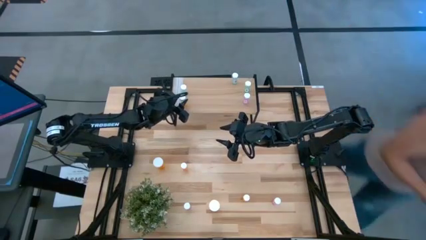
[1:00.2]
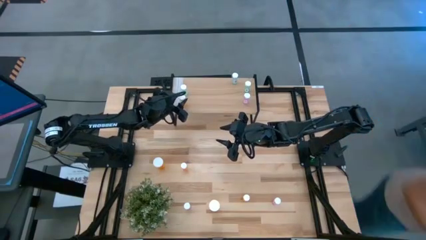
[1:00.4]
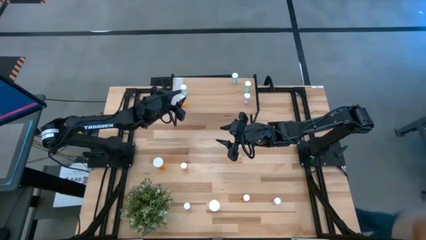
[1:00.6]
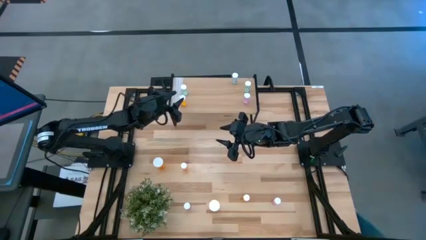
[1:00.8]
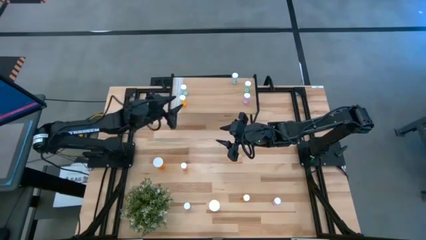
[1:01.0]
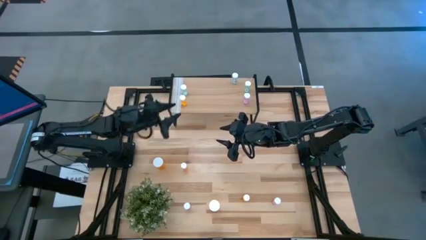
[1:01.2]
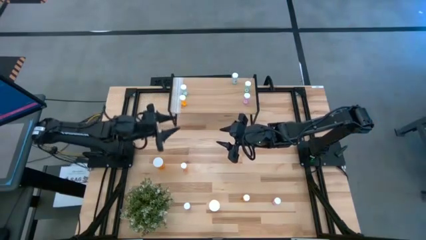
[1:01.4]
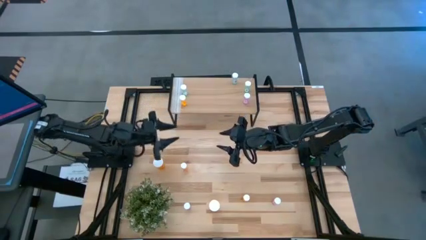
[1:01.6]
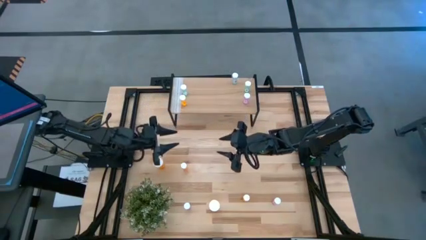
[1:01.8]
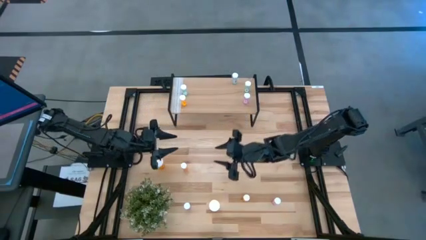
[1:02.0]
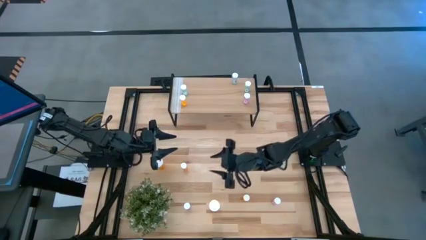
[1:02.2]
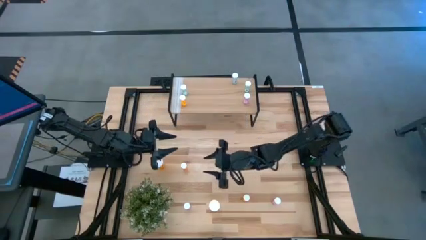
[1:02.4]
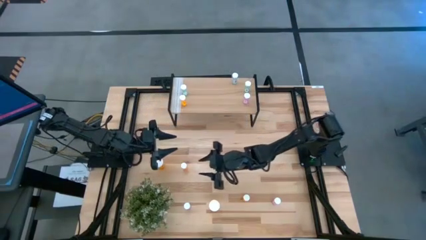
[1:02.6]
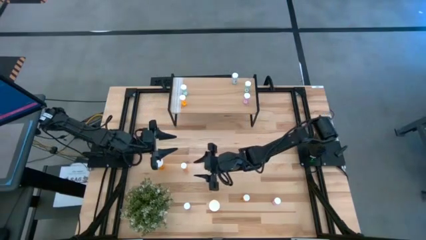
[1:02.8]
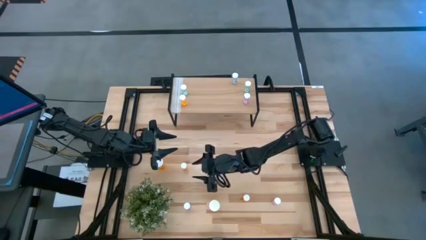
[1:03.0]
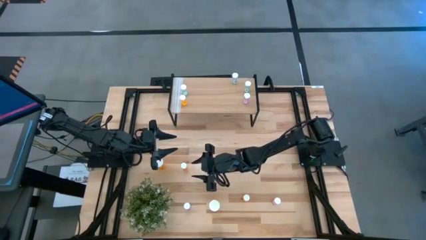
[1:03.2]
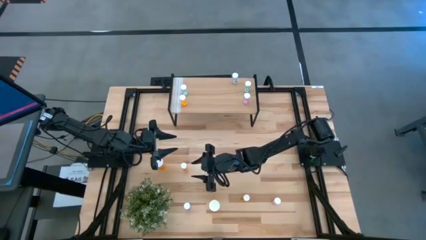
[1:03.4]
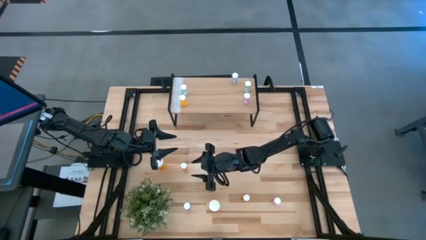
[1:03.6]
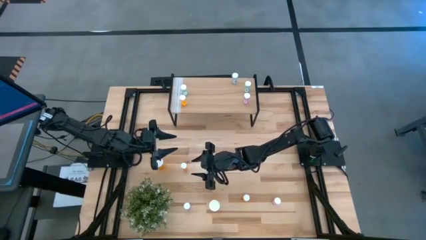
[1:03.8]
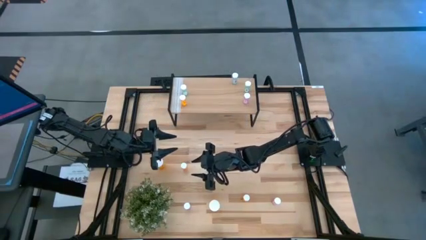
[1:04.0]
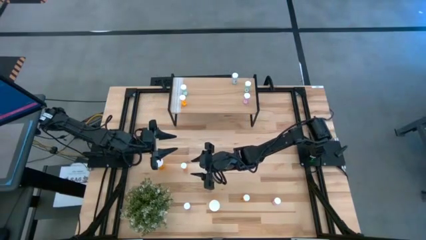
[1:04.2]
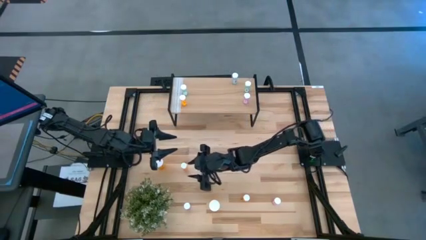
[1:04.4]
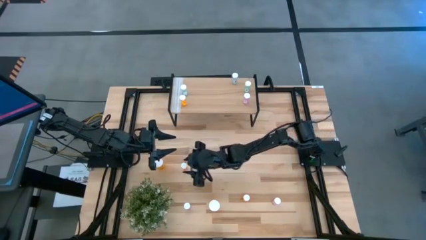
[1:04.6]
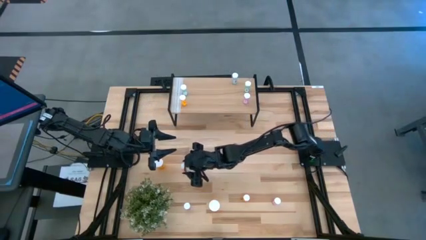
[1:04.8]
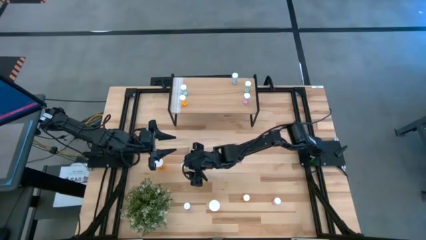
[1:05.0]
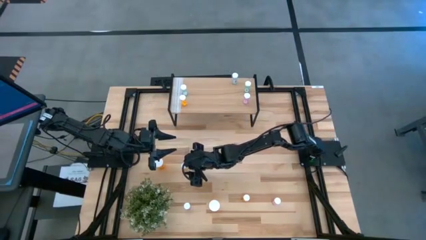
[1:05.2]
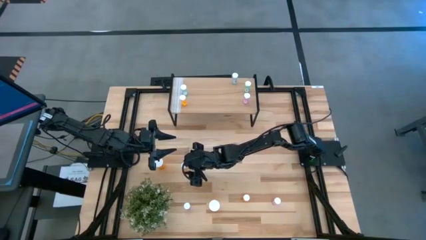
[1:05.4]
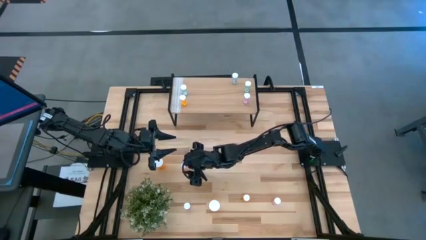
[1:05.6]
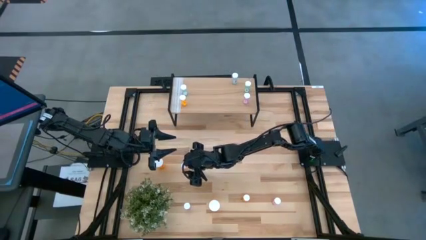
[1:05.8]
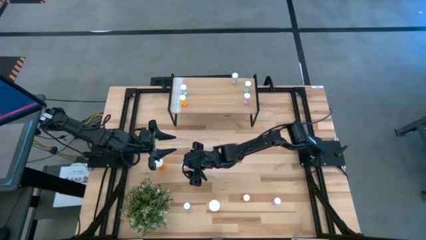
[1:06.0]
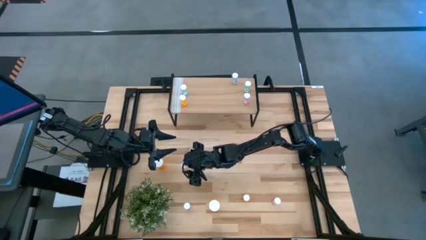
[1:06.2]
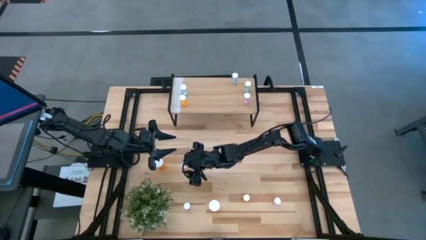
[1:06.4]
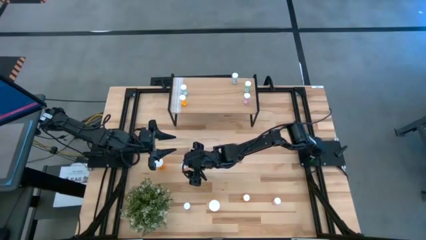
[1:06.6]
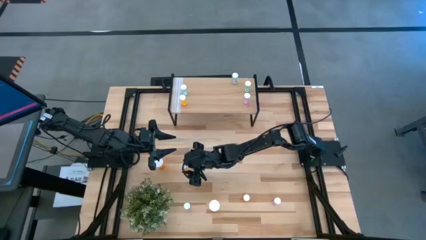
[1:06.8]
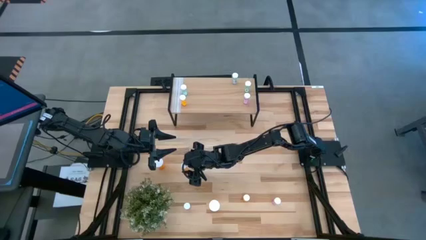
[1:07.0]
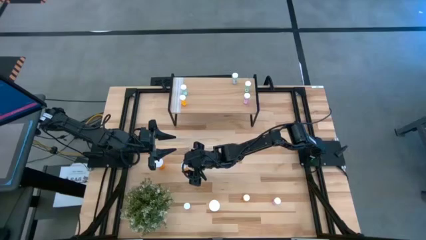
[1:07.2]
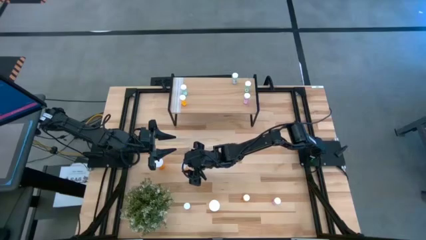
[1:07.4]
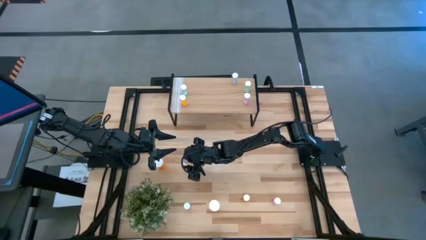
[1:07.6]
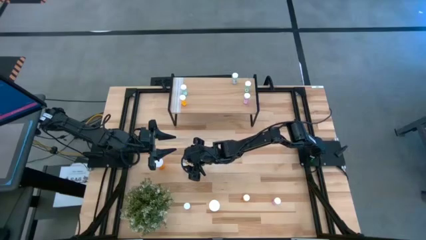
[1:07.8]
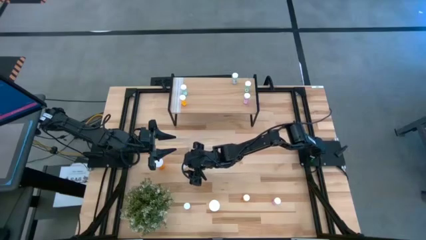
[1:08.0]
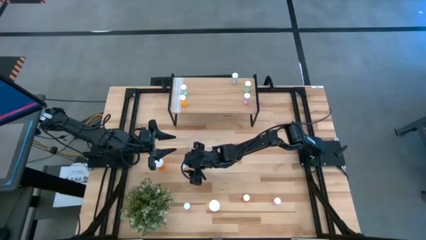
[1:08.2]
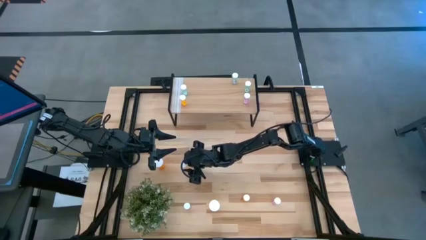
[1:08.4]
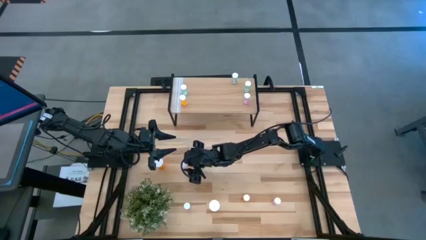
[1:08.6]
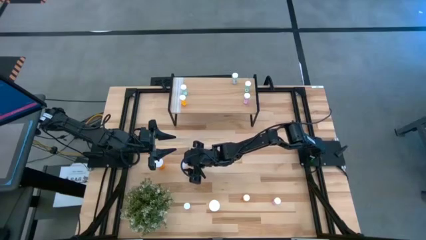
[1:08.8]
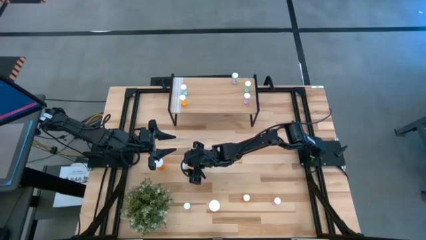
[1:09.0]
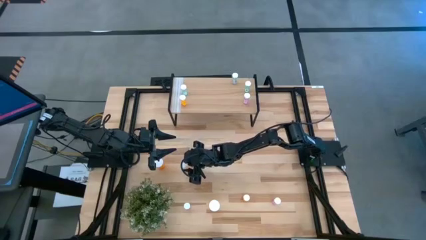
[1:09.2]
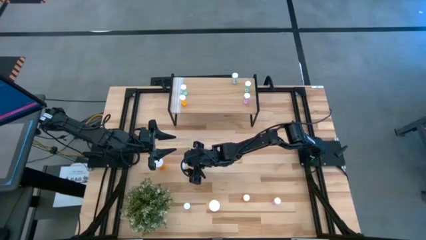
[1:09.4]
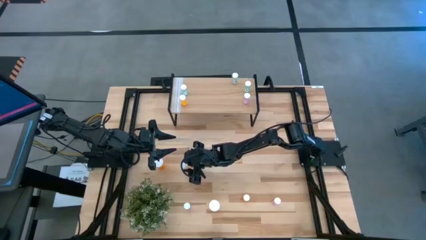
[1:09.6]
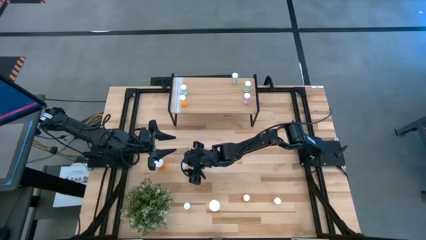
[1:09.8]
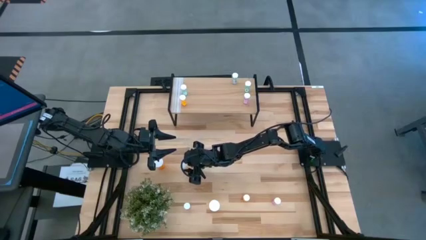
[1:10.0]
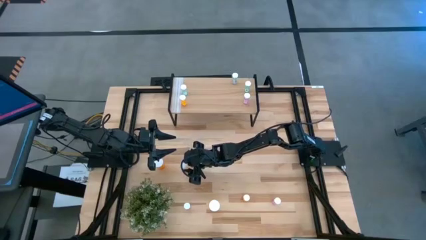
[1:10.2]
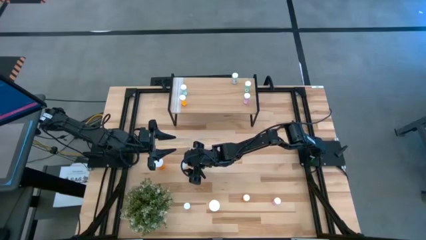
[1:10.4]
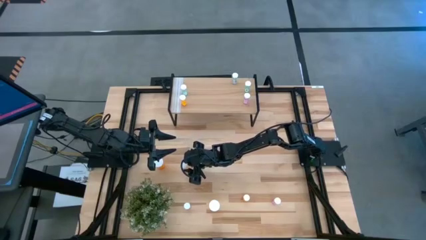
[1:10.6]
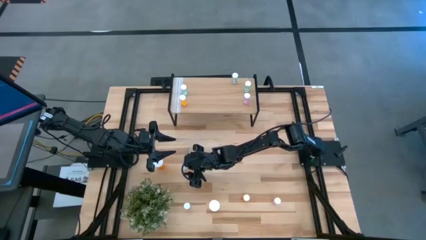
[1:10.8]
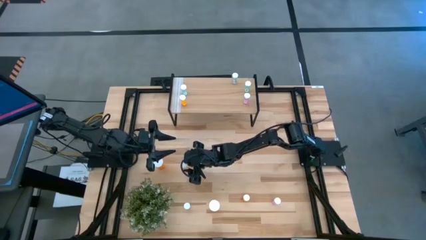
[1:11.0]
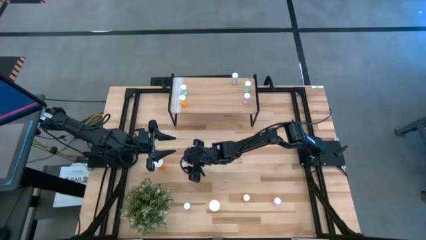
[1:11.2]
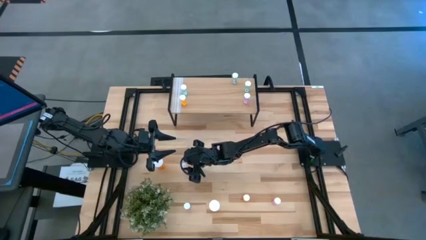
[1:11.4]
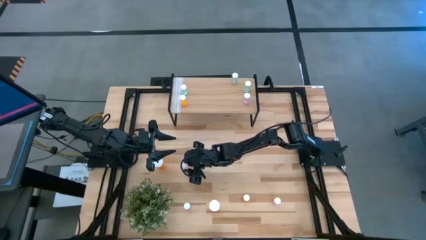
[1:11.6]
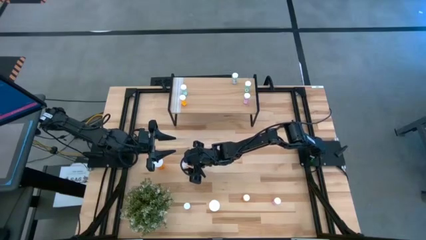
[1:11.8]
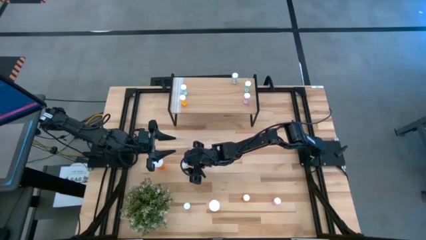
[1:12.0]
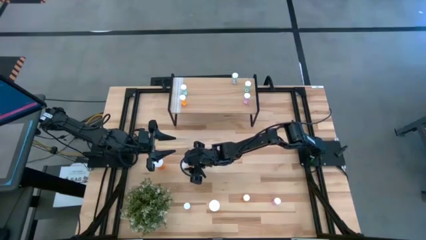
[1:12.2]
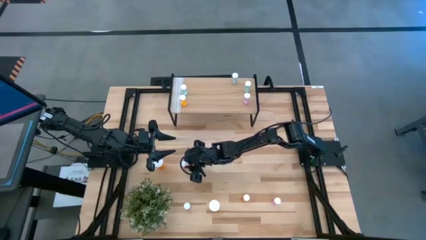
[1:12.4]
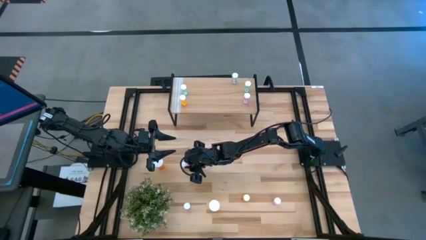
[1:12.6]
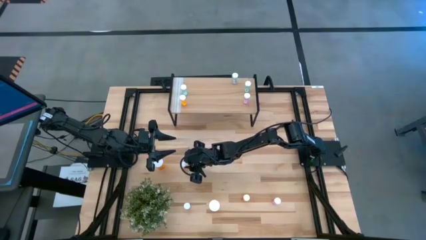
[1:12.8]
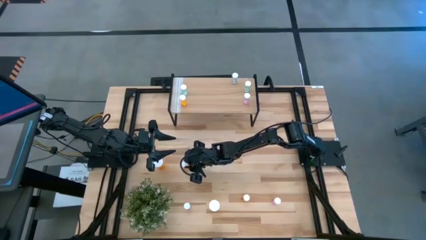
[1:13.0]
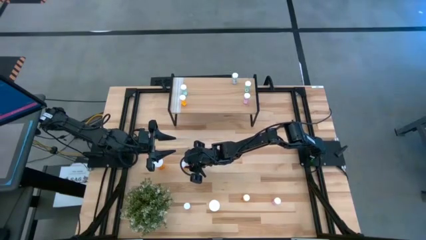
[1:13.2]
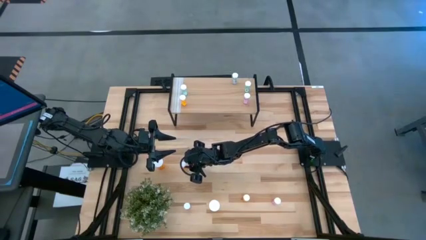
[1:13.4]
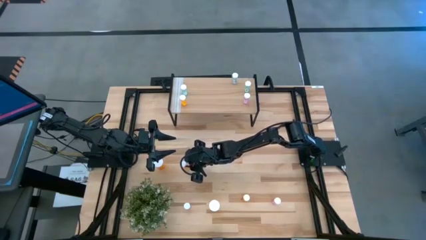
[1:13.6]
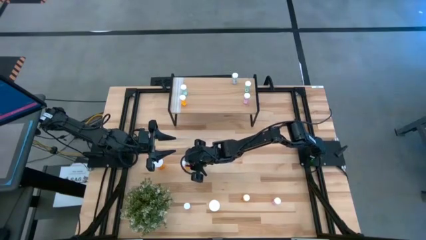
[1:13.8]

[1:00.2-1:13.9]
Task: Pick and place medicine bottles onto shelf by color
Put the left small orange bottle on the shelf

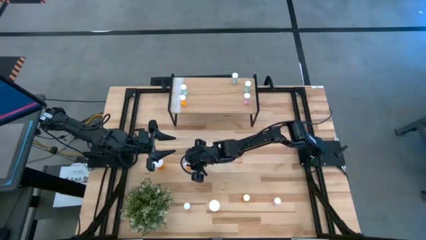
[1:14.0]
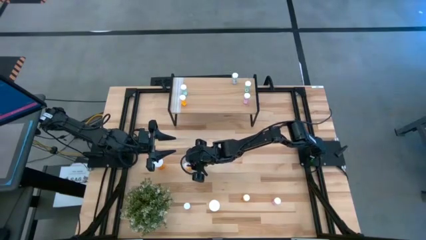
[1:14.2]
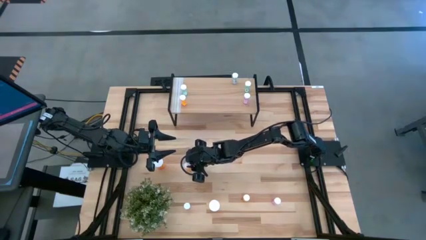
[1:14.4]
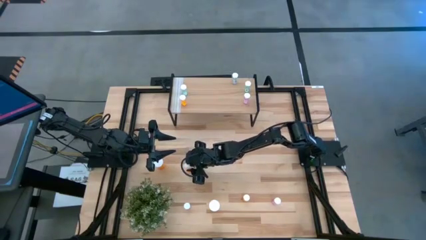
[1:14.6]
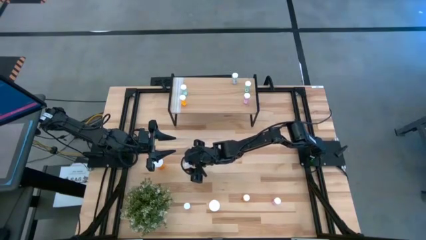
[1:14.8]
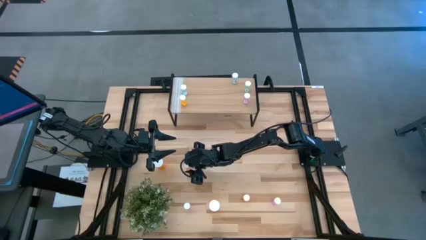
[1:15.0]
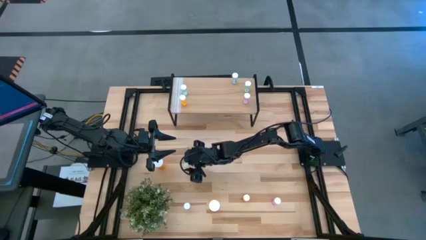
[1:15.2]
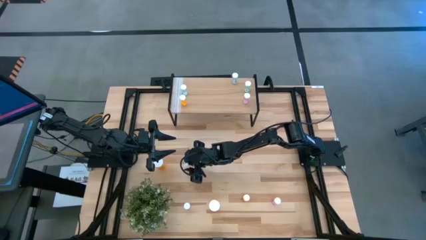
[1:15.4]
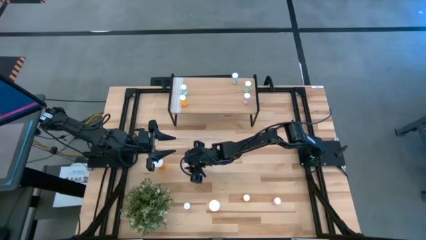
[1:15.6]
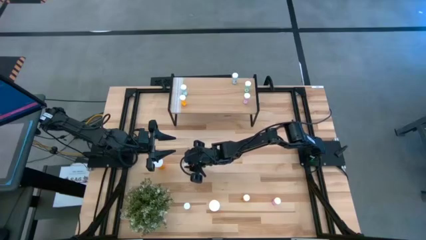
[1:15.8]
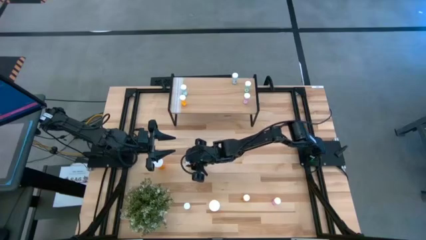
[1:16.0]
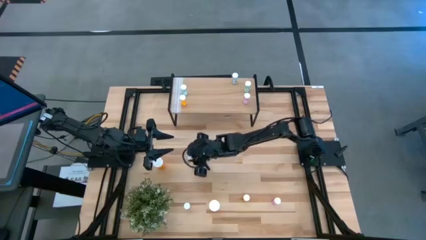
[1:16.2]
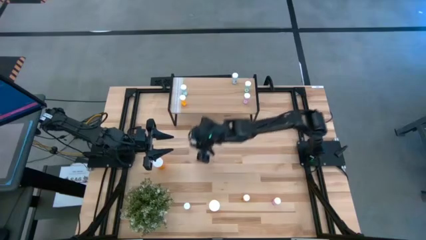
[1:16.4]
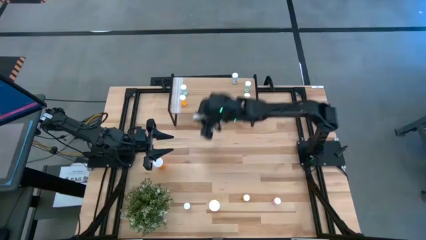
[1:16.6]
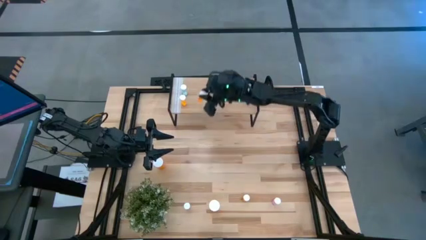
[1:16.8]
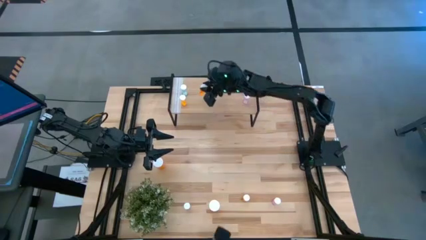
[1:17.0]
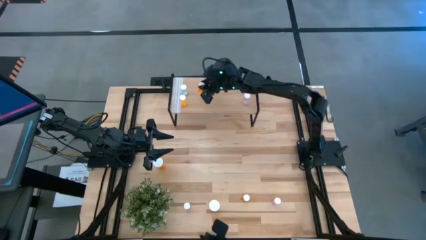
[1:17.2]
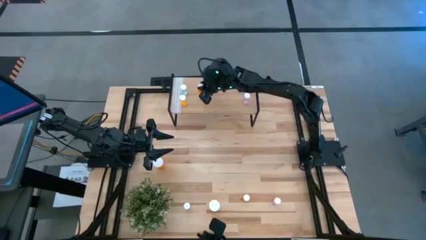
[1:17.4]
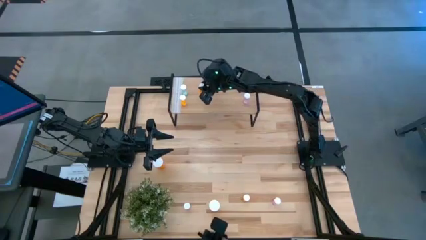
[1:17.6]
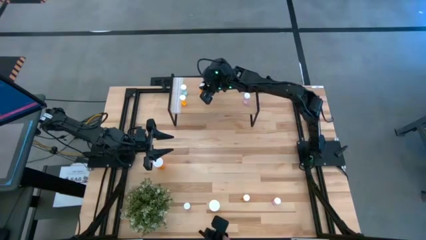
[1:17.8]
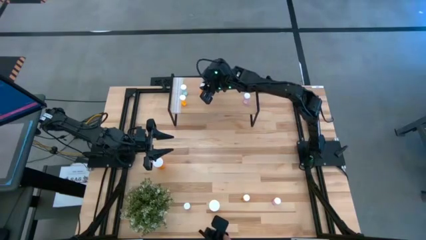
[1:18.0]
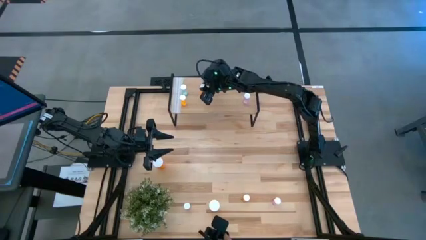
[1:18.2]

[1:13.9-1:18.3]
Put the left small orange bottle on the shelf
